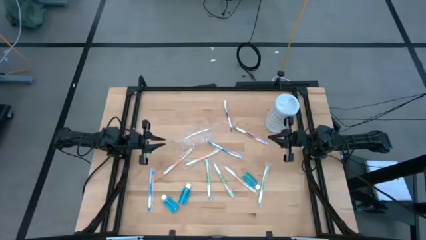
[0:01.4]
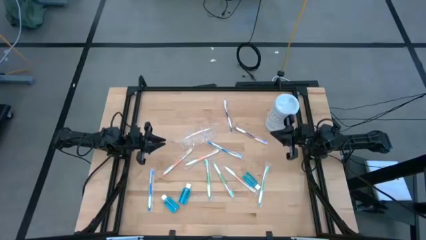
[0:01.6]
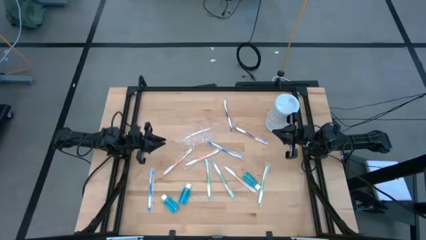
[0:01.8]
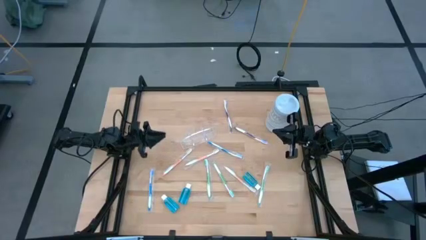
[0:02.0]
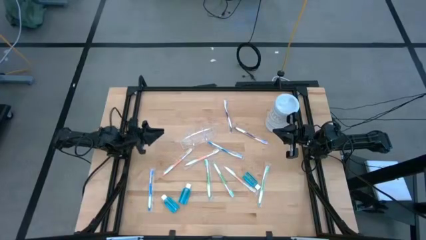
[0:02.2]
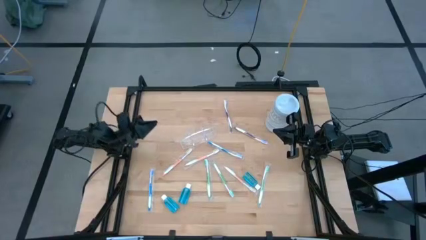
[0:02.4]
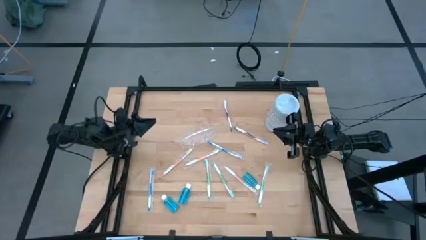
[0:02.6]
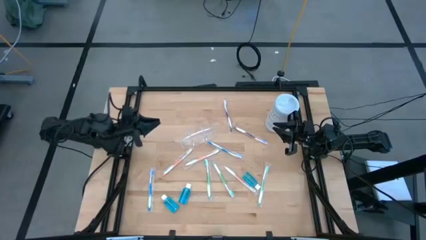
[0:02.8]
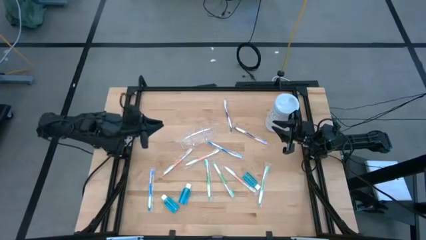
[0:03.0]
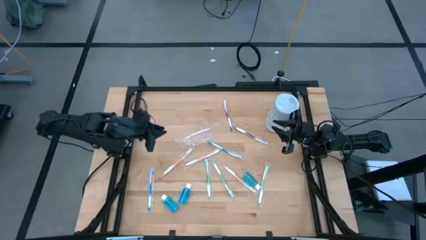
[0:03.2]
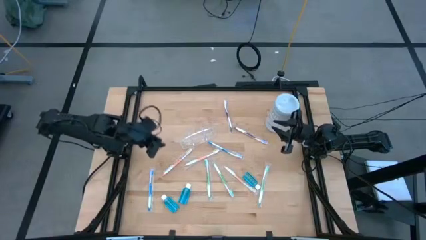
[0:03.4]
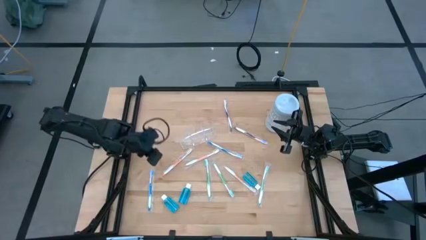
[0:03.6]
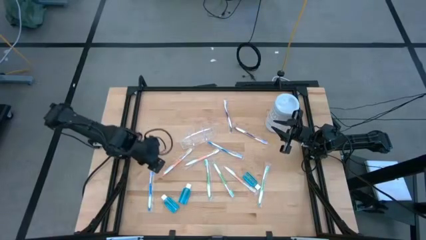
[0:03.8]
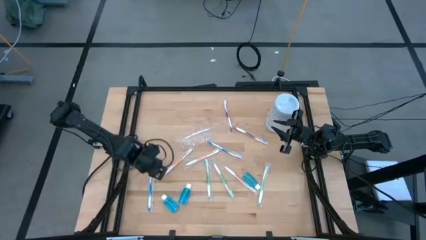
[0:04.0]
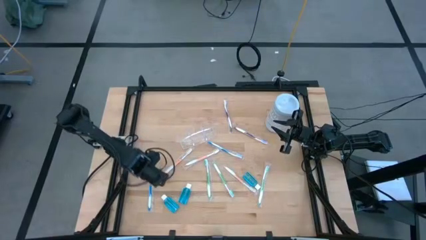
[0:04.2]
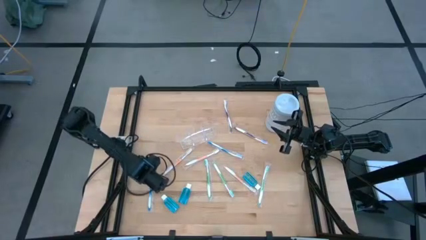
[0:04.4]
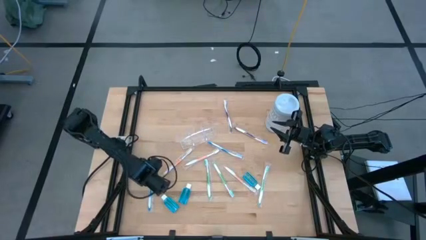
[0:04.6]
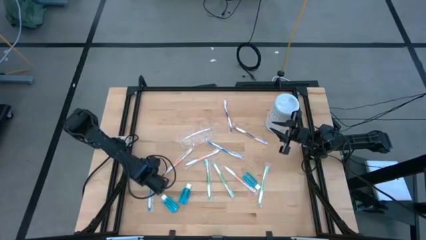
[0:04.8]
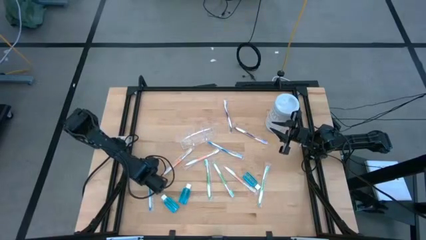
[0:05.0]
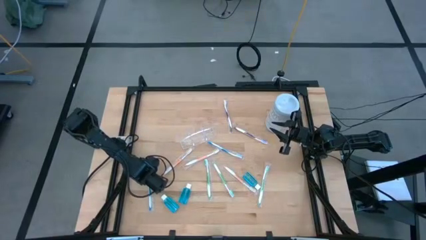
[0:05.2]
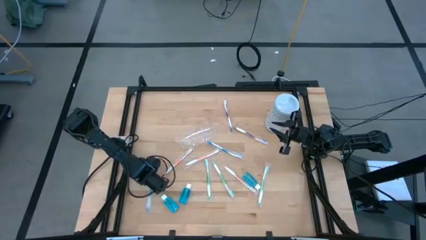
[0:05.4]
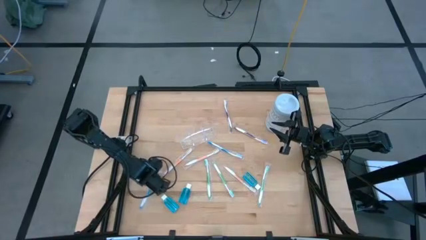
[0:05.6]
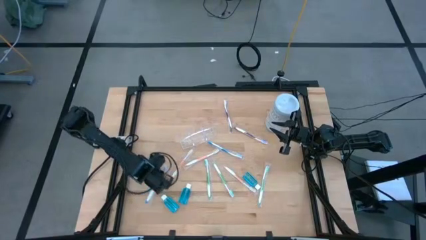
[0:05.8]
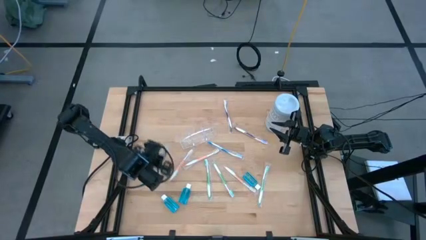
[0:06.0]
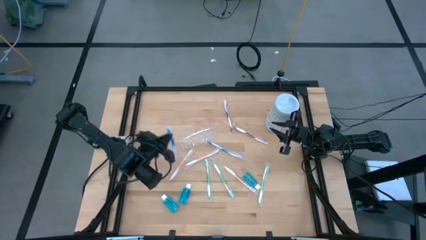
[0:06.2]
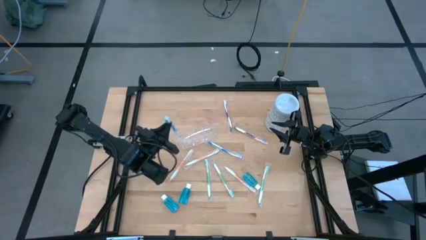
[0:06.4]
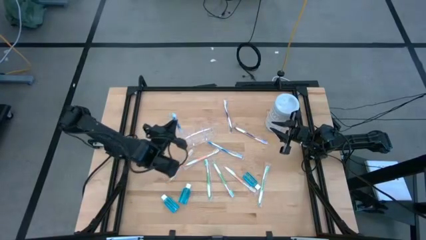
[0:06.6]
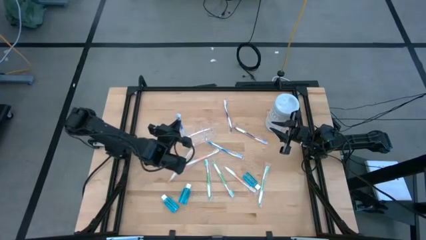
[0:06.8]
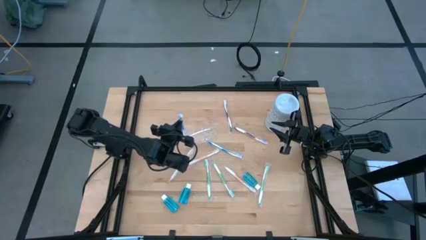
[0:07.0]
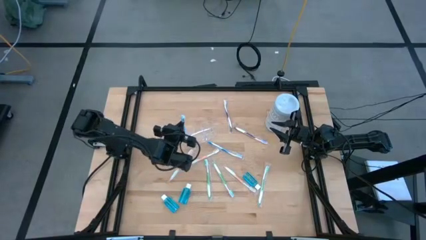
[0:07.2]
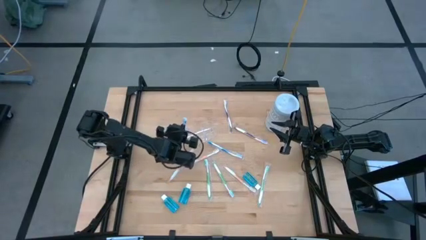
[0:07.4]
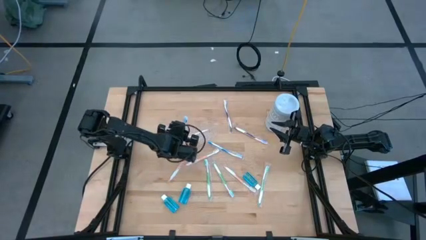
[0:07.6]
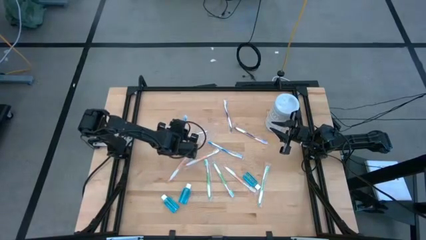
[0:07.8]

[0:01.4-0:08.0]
Task: Pick & Place toothbrushing station
Put the bottom blue toothbrush into the transparent organizer

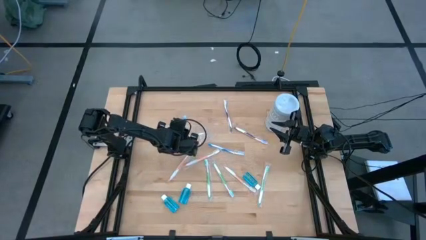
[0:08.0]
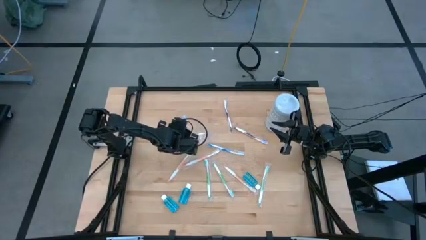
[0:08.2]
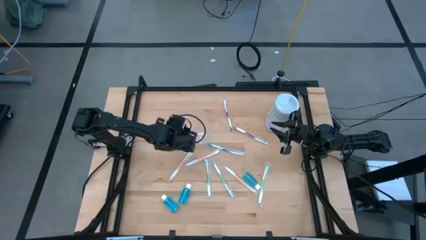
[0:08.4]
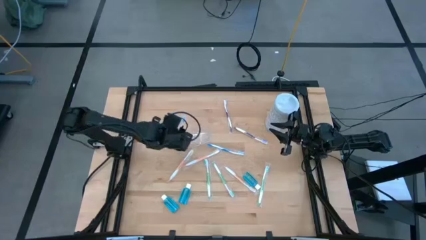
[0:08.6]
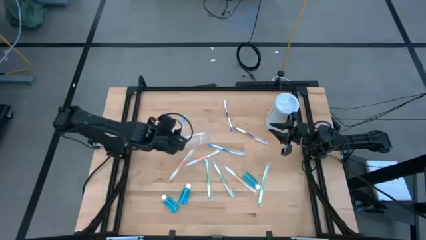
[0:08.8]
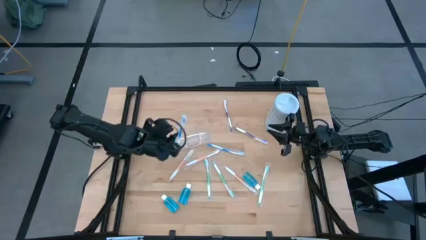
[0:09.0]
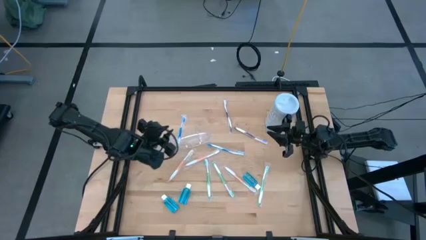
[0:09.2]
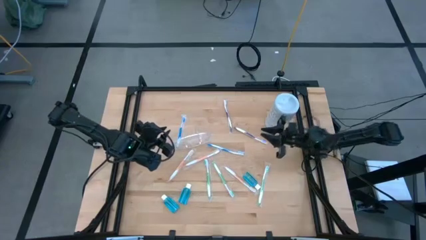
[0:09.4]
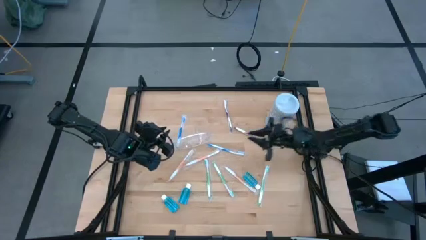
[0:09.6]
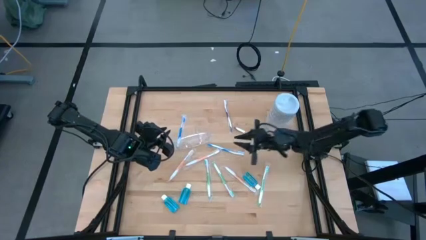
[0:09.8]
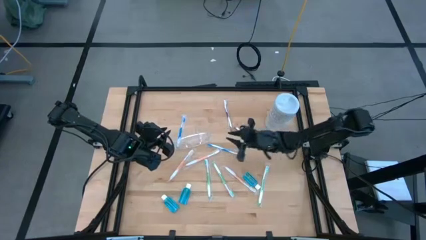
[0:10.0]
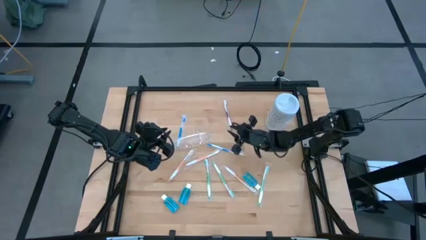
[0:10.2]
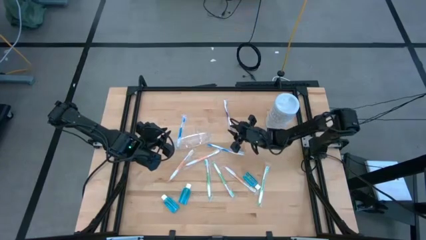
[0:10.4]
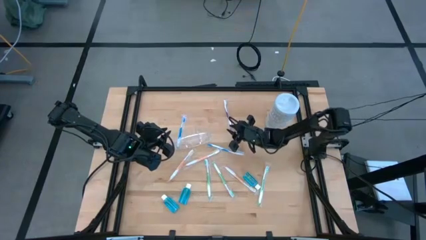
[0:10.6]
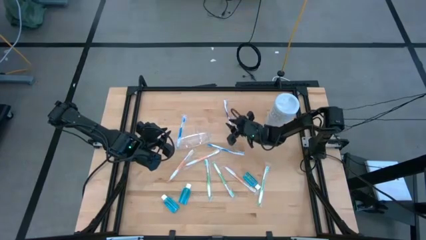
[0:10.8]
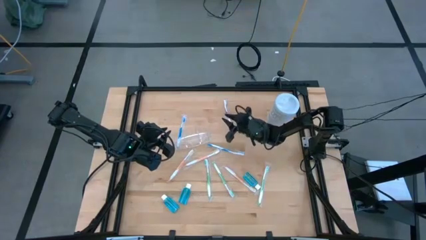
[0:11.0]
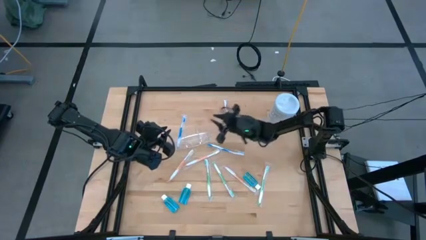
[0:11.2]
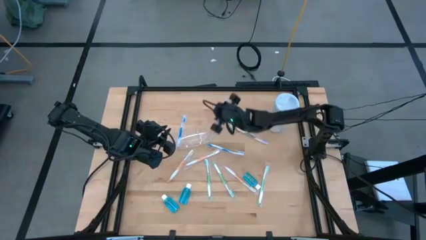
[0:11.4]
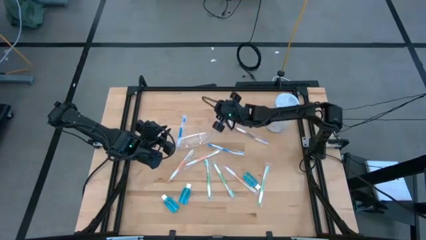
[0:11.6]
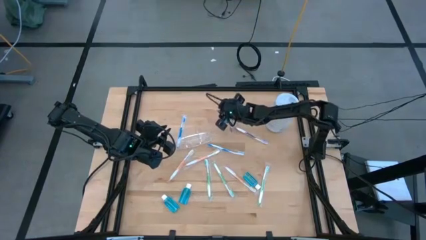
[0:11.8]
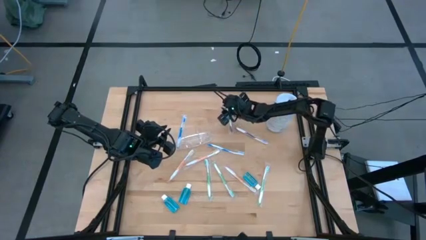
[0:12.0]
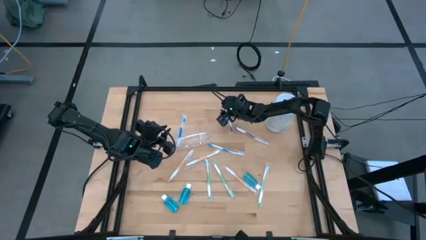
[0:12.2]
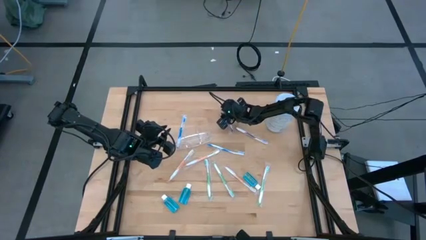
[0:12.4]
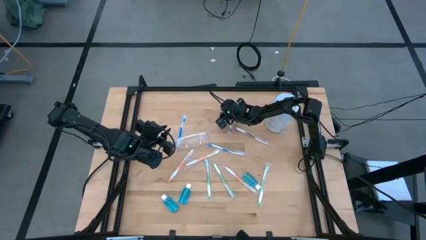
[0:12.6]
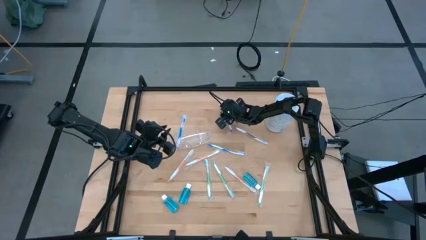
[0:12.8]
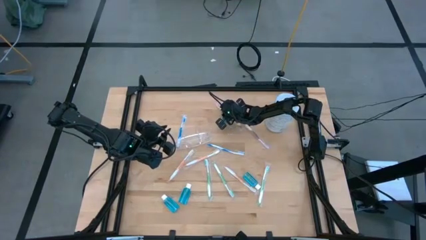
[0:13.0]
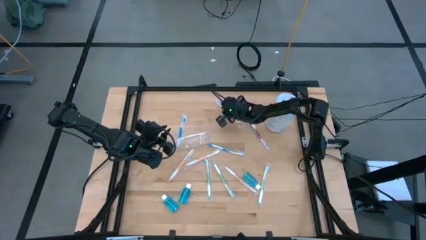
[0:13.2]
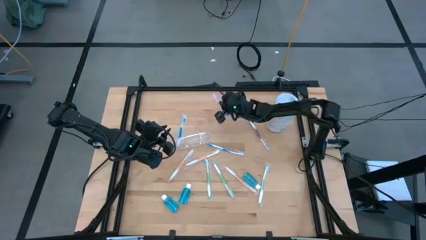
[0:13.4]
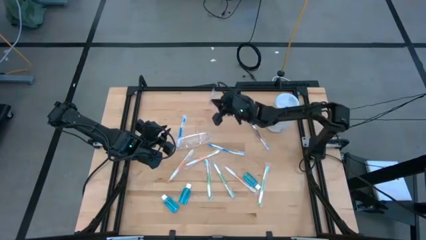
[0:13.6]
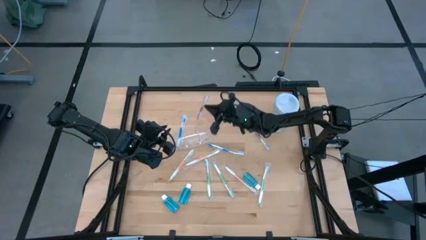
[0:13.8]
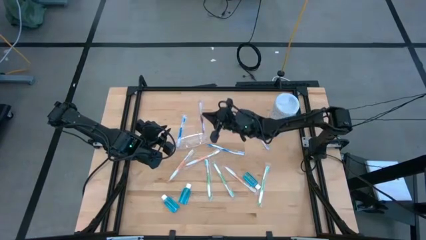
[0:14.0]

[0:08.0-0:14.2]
Put the top purple toothbrush into the transparent organizer

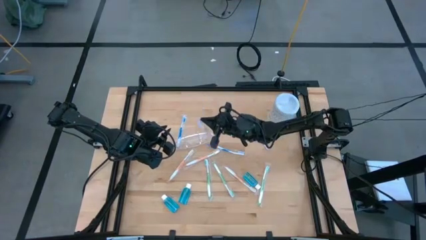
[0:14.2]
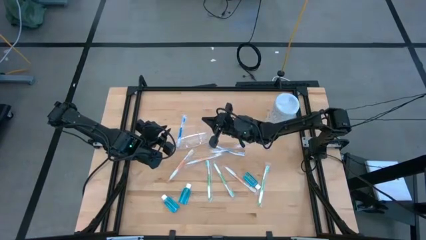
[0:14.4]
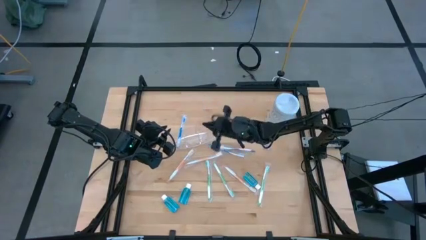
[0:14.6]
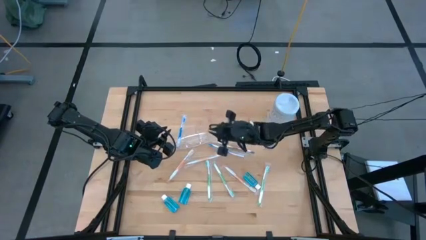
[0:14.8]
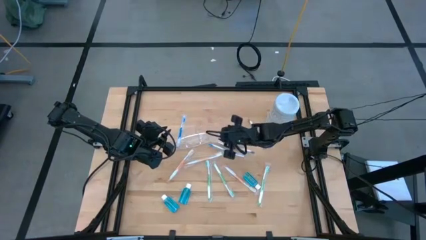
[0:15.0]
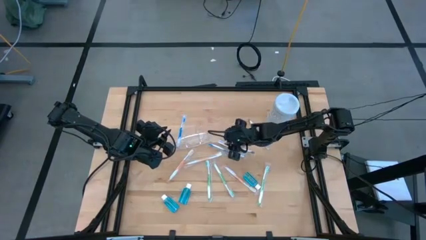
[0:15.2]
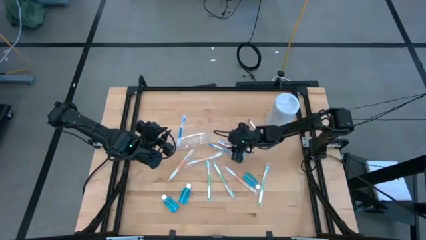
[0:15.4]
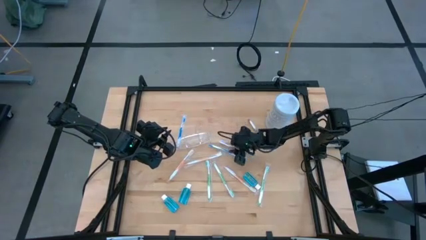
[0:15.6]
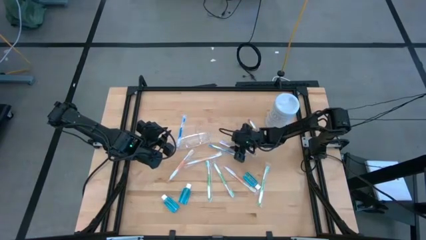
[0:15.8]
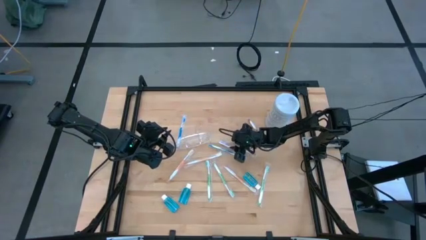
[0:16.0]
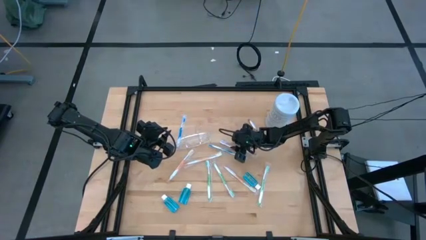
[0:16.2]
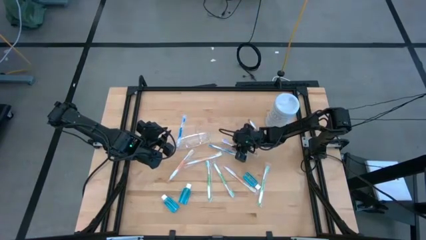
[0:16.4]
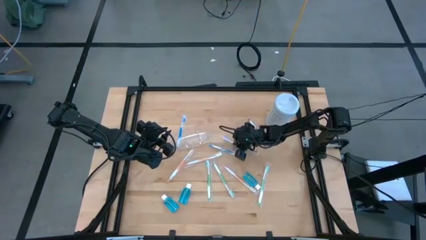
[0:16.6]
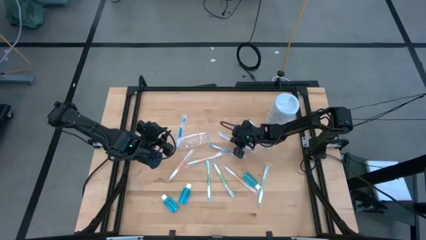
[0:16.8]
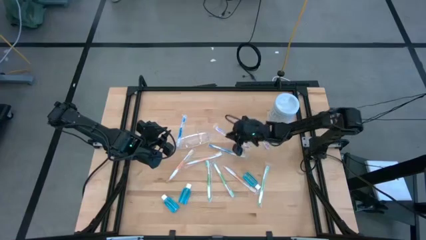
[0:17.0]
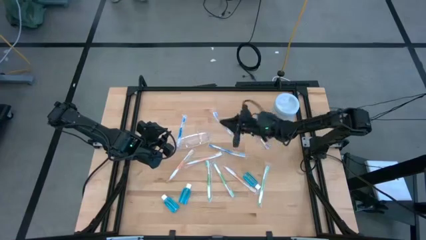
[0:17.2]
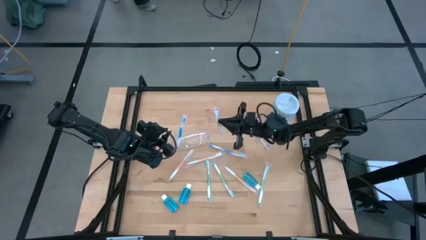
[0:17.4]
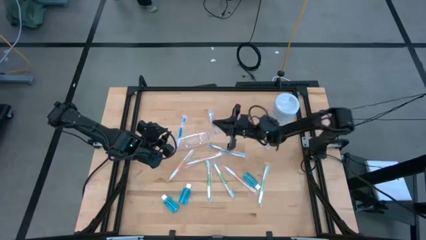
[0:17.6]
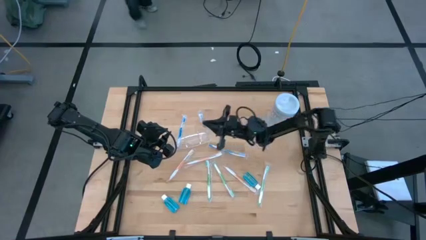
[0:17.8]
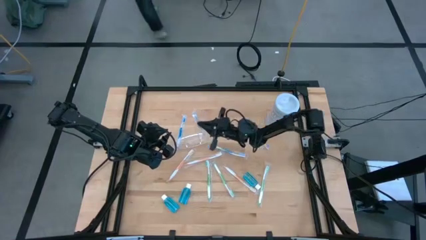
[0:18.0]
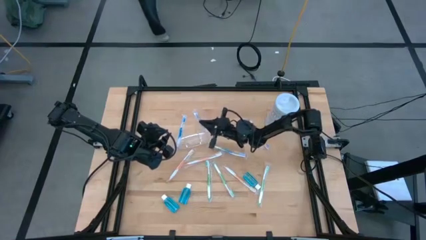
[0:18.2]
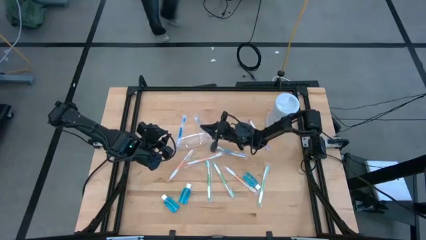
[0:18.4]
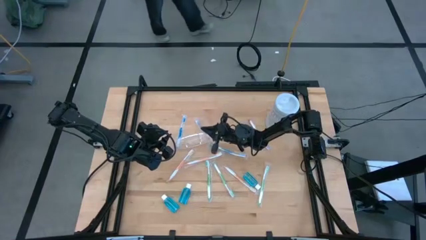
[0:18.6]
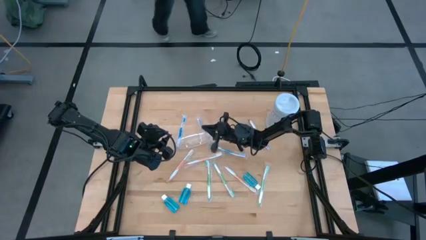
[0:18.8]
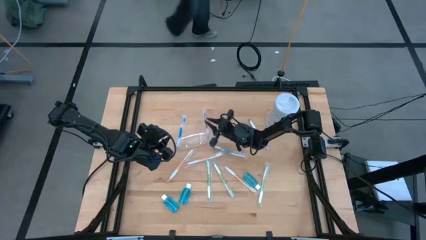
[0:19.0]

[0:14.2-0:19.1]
Put the top purple toothbrush into the transparent organizer
